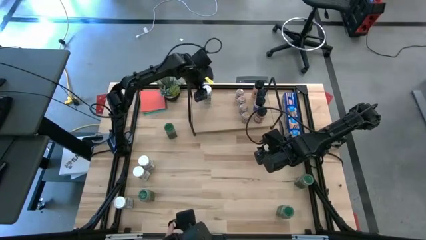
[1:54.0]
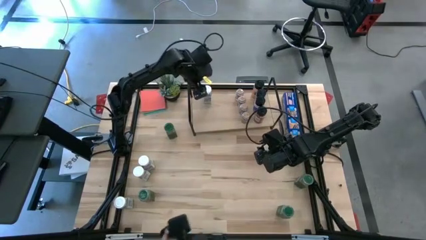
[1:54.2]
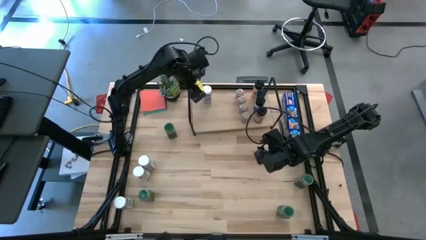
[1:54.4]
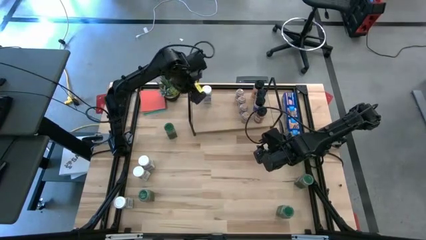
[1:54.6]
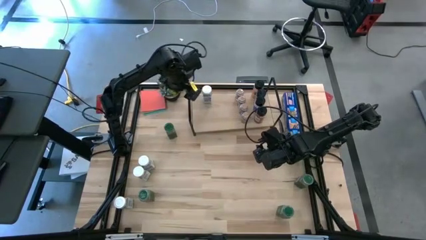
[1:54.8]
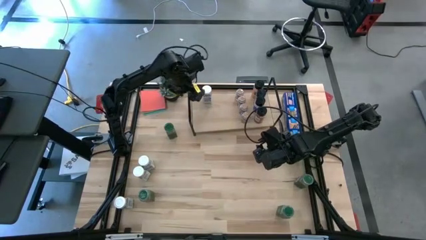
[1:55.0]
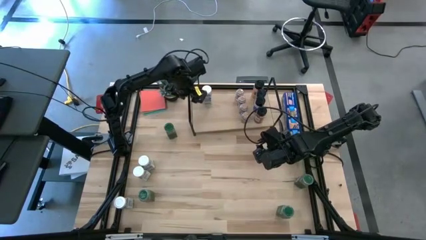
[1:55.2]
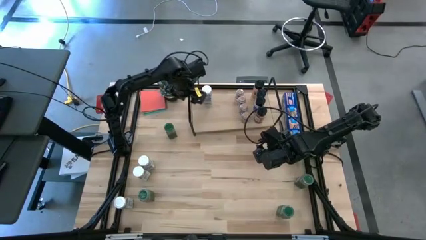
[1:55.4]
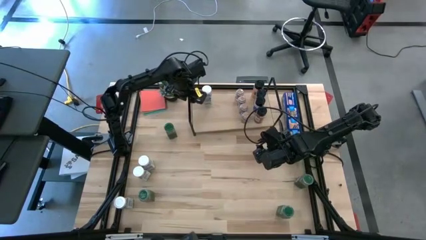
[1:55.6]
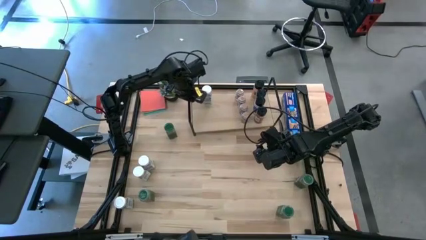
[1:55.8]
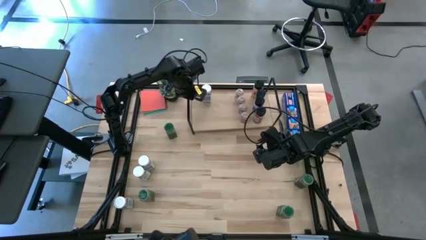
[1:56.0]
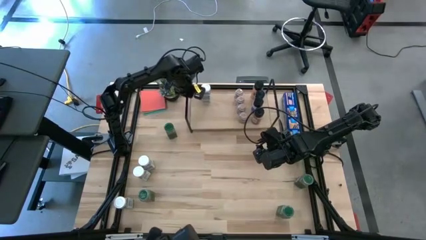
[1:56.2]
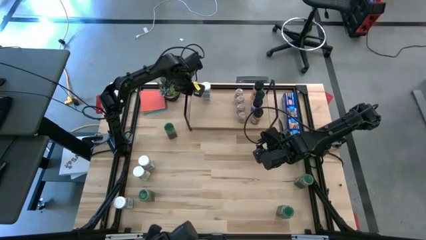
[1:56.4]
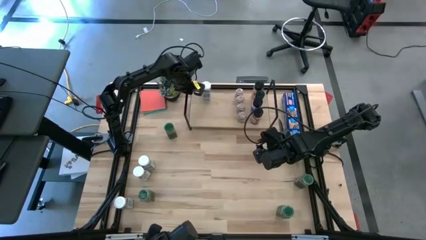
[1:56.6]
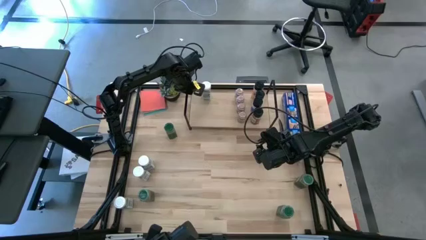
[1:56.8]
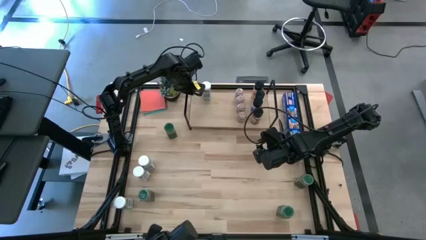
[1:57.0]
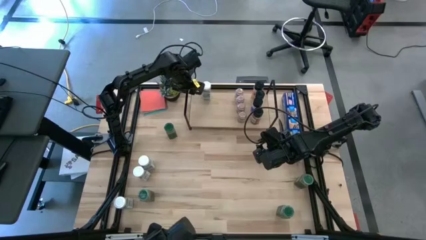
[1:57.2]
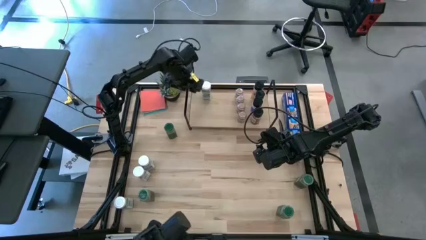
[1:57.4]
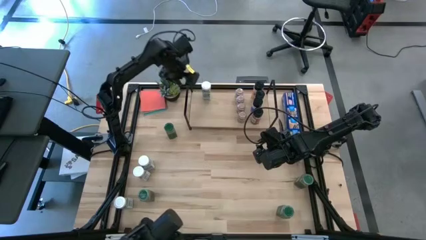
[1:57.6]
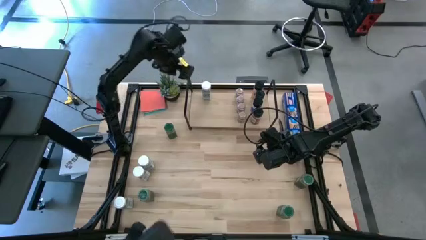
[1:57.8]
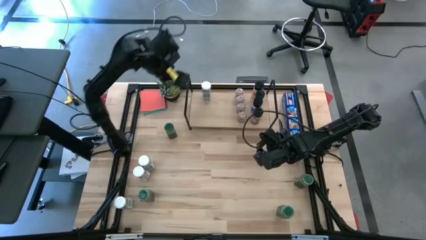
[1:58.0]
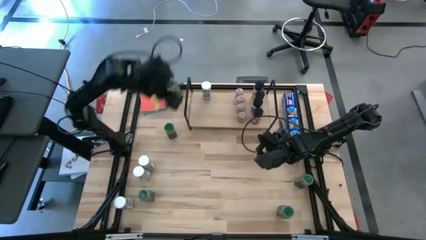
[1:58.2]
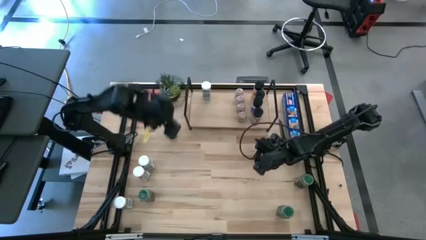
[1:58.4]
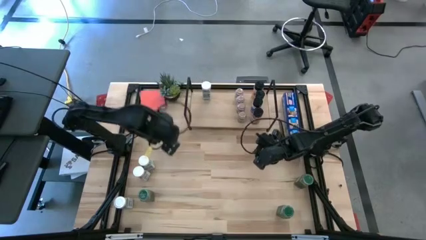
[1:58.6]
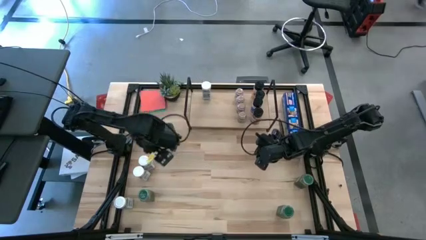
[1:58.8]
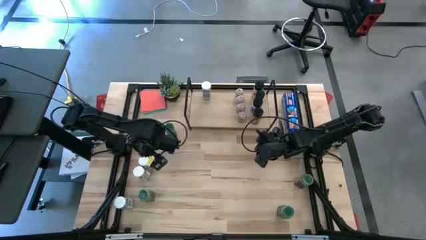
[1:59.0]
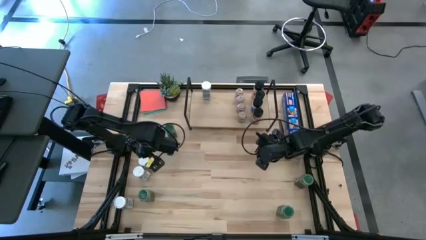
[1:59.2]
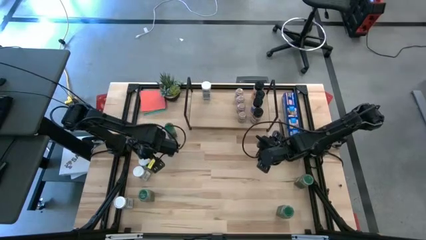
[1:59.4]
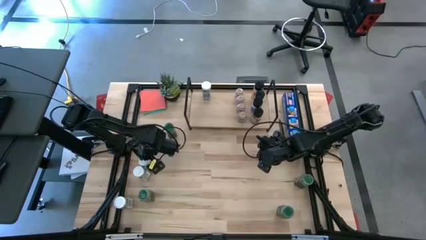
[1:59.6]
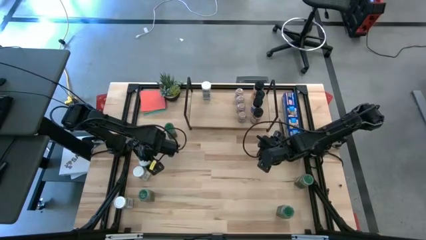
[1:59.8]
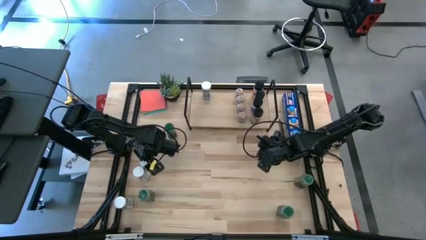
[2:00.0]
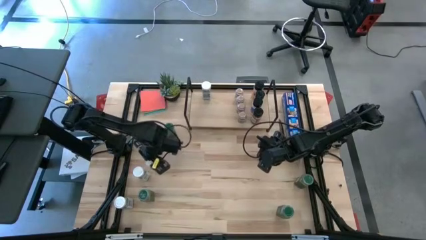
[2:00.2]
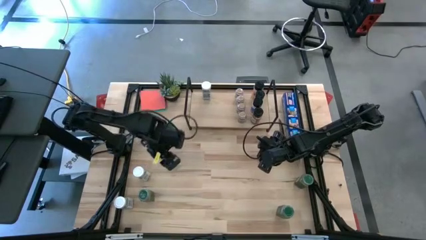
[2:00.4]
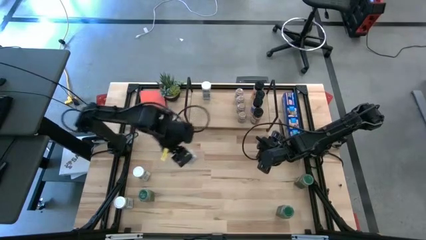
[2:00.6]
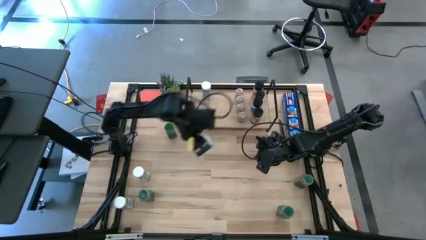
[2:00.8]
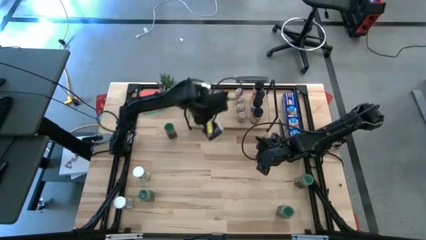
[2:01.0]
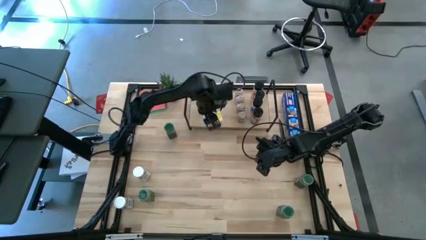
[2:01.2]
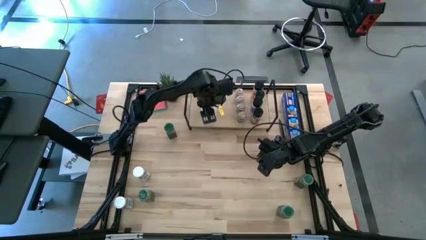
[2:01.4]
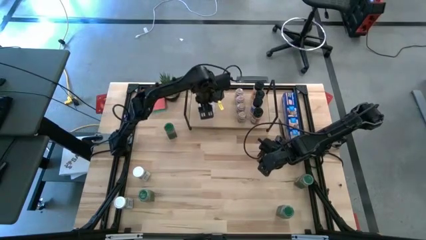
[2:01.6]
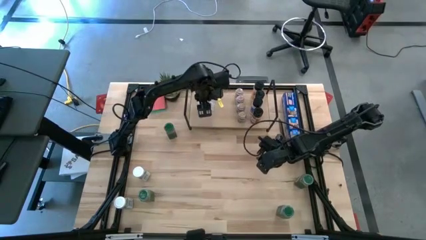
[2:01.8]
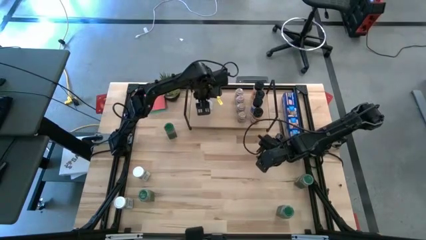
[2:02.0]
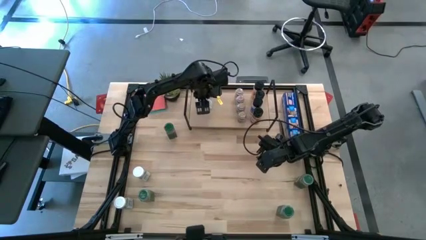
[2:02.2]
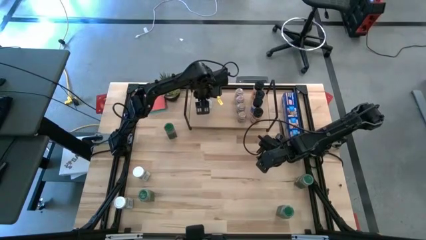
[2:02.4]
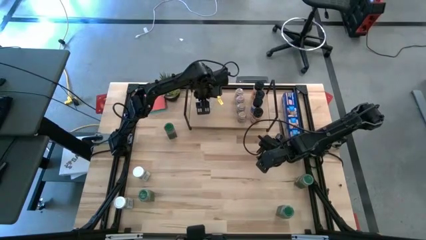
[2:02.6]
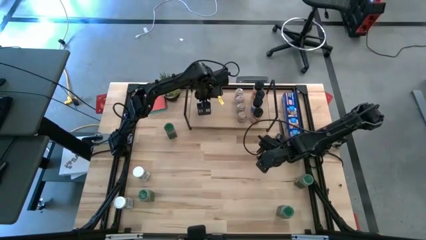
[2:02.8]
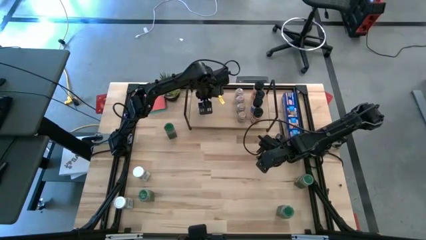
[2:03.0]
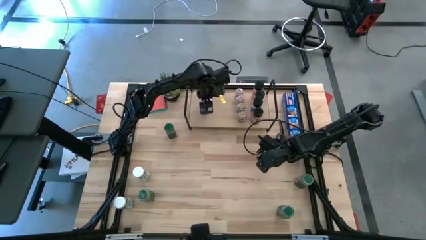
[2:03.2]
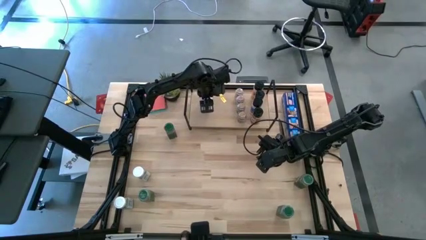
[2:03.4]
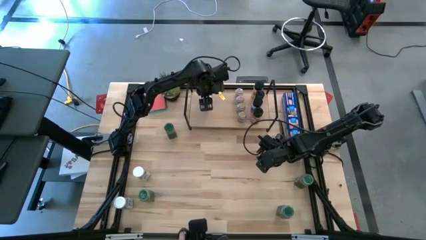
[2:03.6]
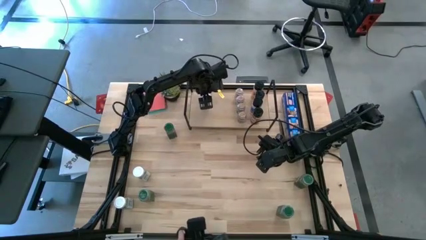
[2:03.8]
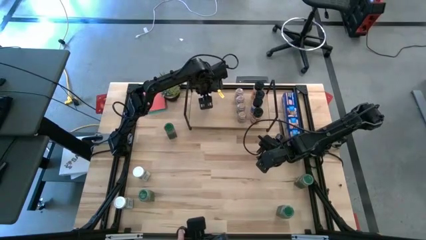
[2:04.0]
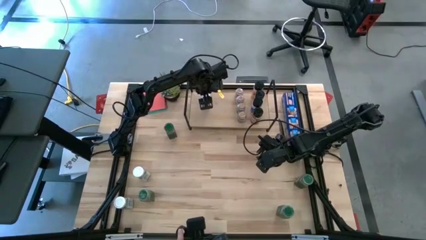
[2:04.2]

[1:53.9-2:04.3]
Task: Shelf spices
Put the white seasoning bottle on the shelf, aligned with the other white seasoning bottle

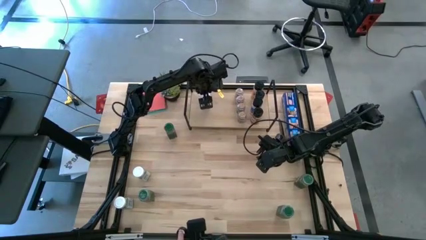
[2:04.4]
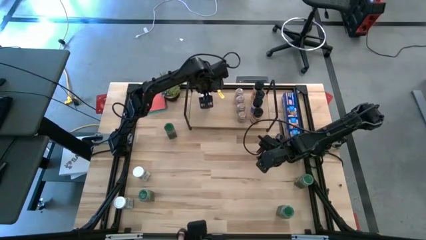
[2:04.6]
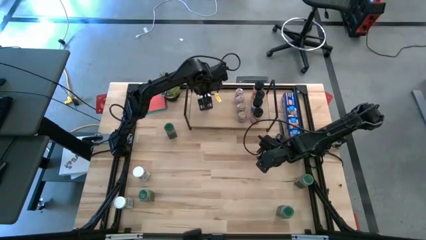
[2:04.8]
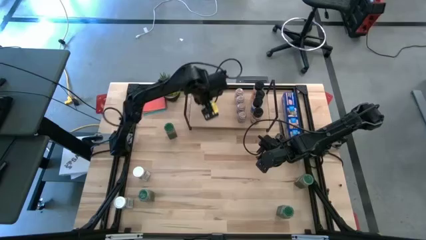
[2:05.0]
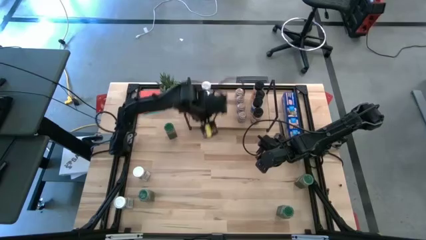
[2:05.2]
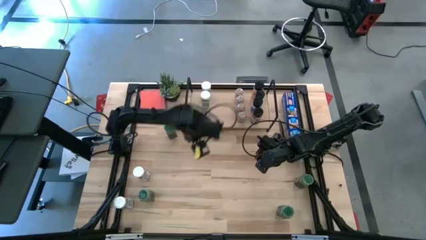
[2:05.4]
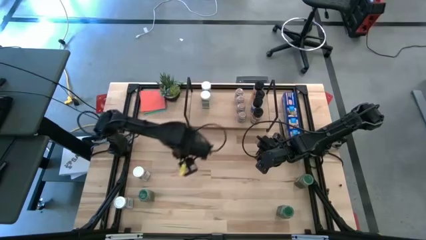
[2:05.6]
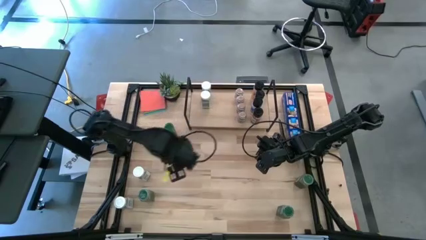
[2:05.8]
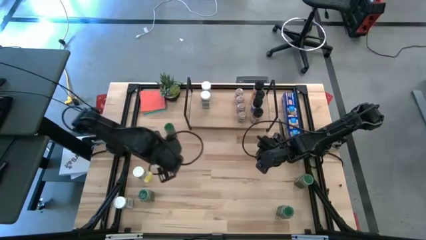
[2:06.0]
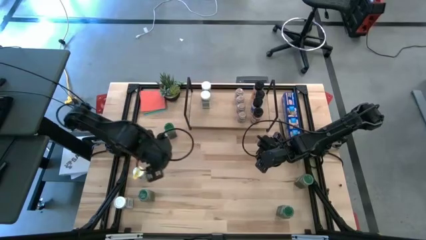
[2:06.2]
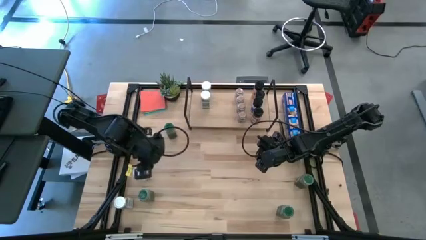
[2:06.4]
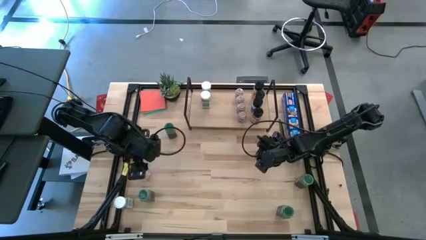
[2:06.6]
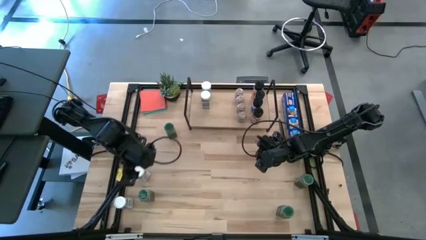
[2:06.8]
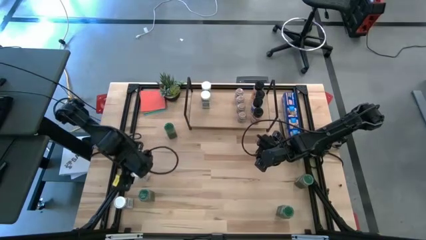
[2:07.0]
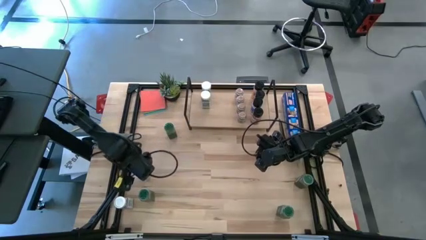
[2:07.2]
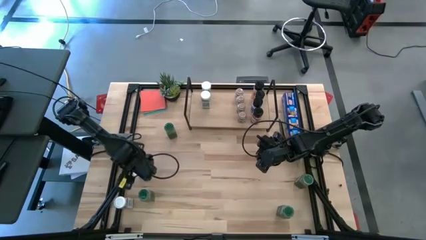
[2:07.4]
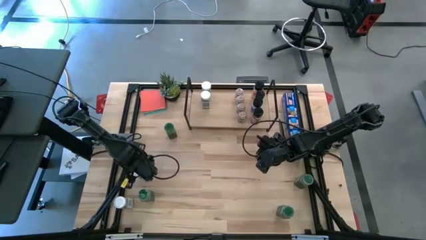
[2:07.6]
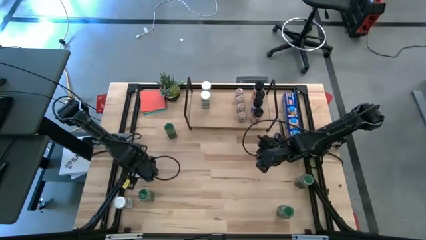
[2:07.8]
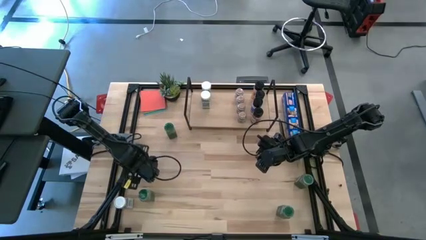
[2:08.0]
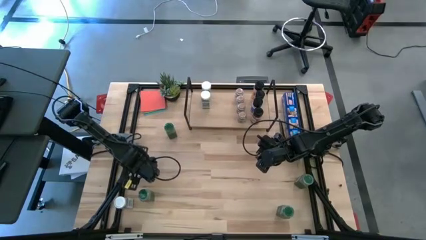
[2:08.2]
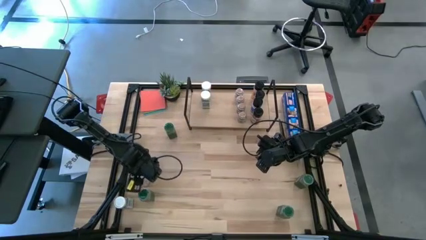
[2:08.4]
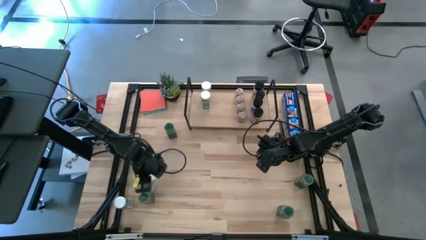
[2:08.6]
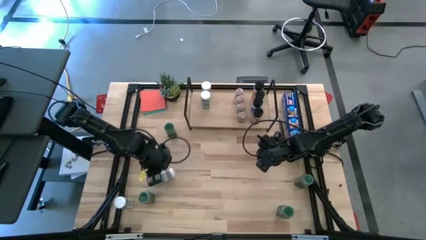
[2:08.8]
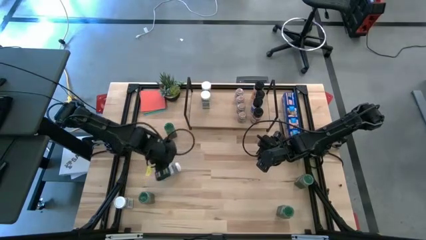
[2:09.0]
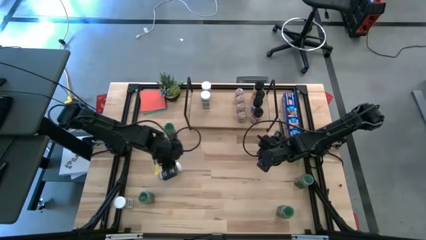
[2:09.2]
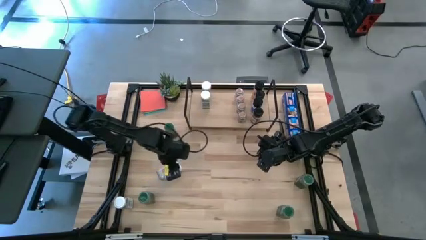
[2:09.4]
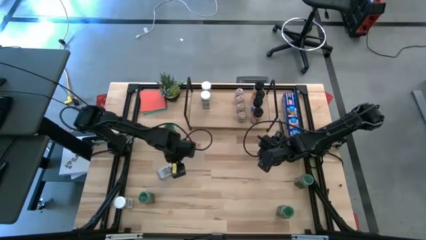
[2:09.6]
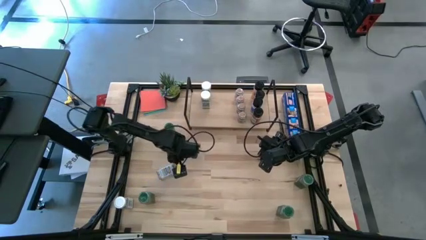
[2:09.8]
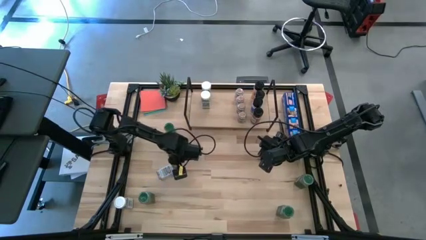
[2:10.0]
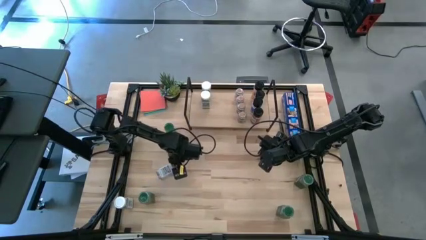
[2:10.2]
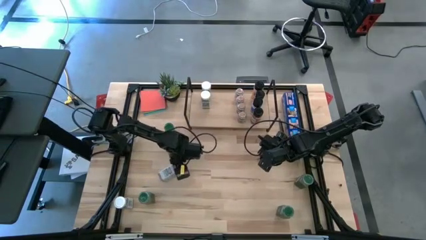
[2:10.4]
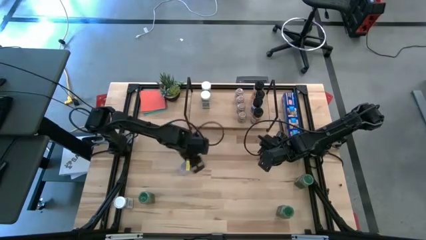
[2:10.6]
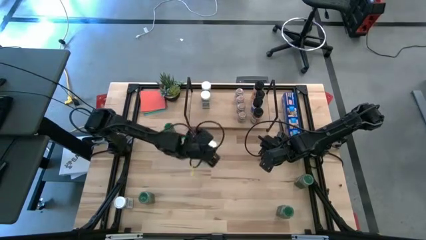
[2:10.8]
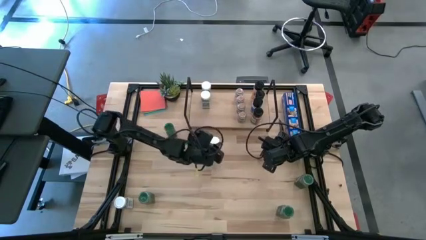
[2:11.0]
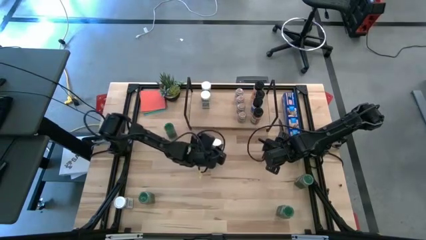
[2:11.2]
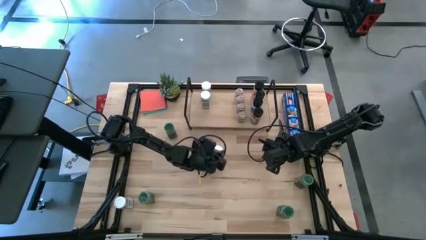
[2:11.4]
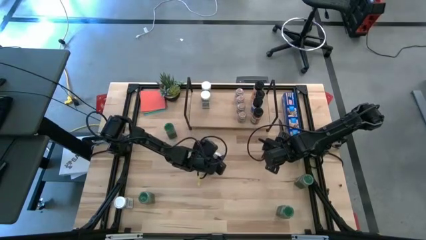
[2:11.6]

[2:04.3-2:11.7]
Put the white seasoning bottle on the shelf, aligned with the other white seasoning bottle
